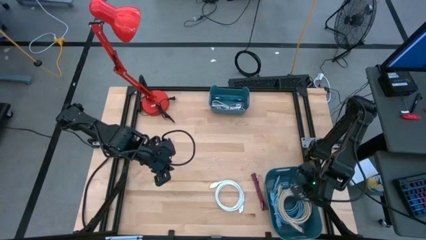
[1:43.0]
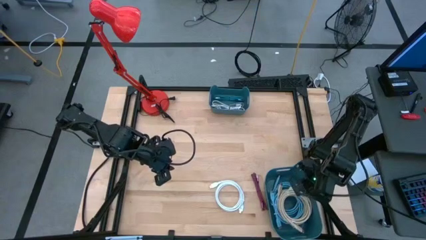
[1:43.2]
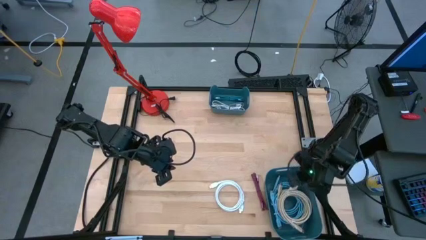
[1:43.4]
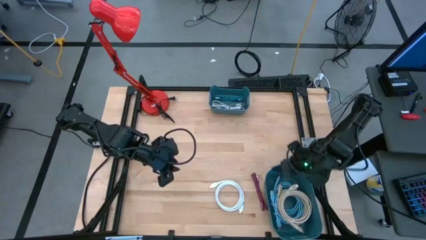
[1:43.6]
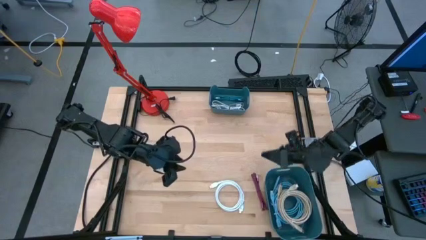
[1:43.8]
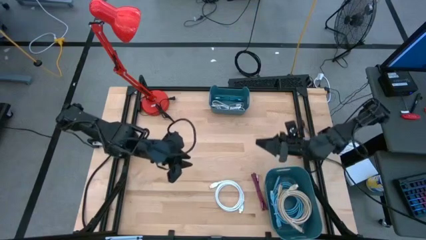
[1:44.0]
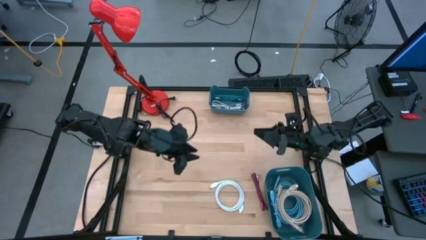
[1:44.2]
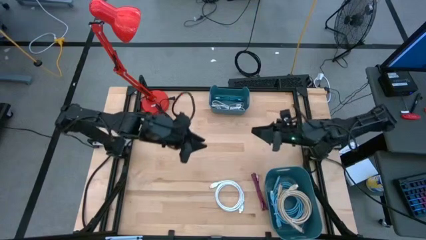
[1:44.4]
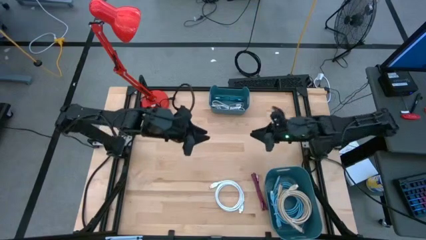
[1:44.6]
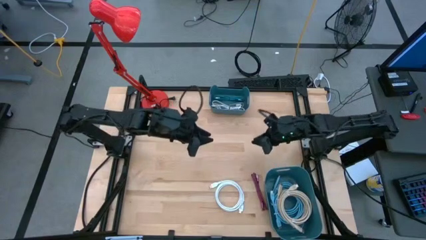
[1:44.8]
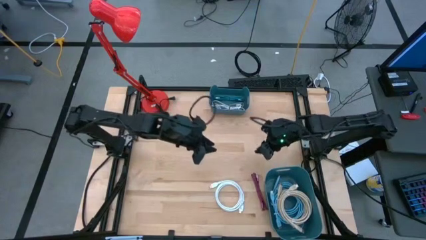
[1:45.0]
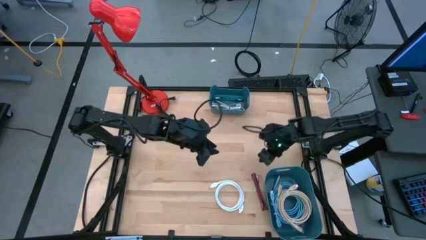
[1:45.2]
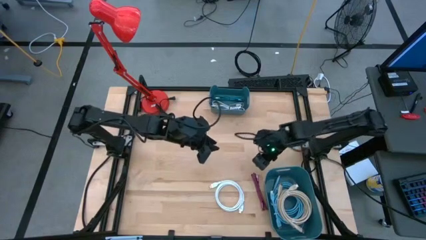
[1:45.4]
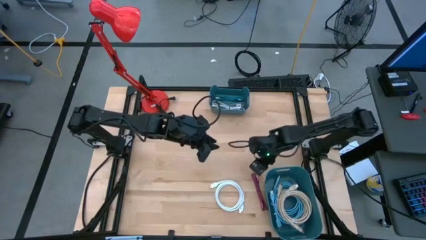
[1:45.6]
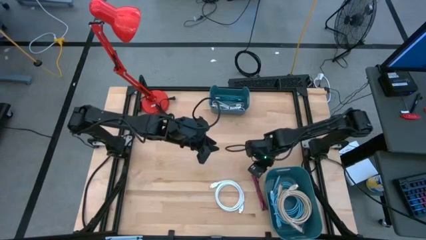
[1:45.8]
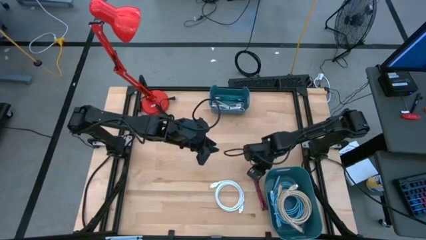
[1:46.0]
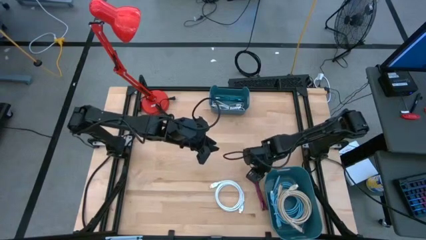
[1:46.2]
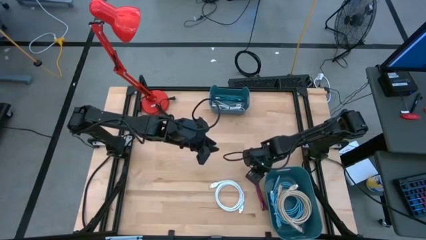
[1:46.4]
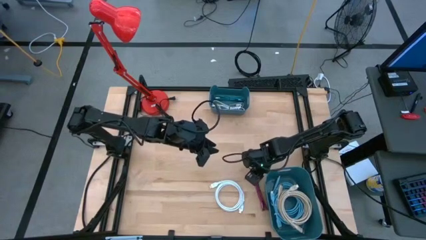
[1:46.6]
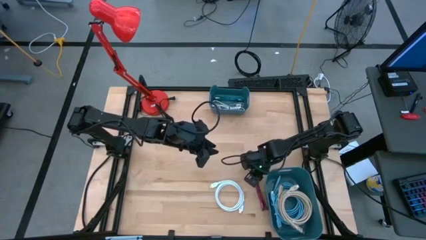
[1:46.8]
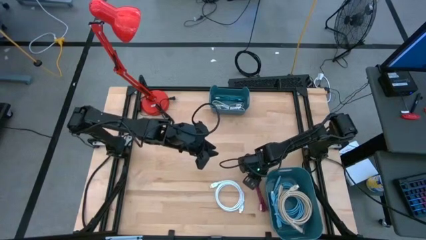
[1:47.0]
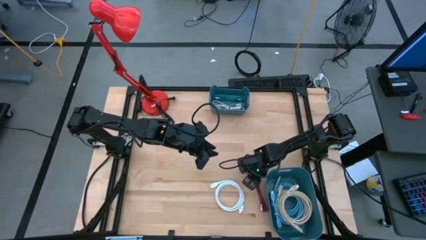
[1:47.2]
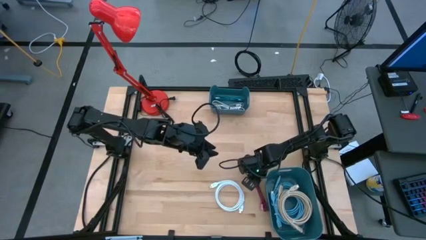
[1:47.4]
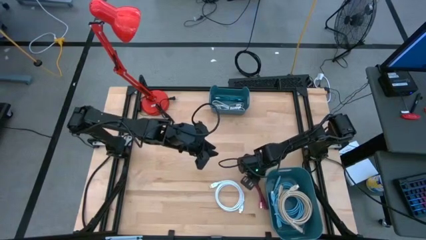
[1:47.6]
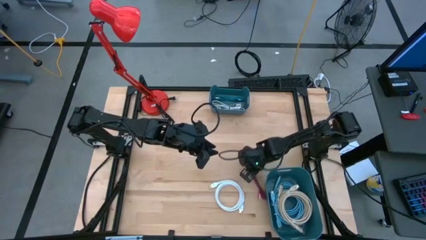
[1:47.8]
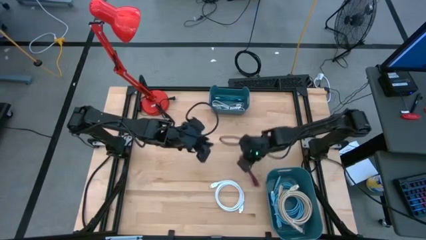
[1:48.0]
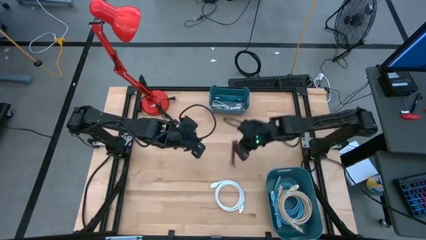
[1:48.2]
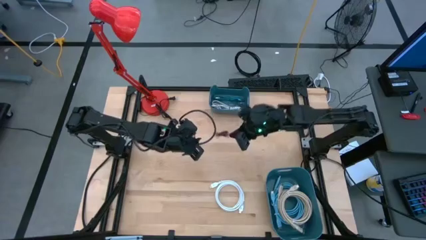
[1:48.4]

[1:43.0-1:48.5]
Task: Pick & Place USB Port
Put the pink charger cable into the top blue bin

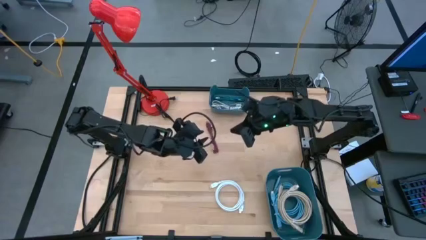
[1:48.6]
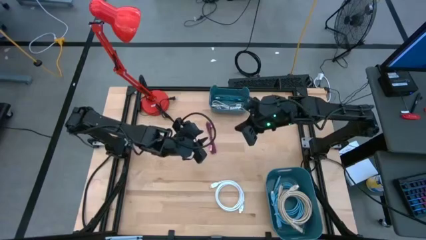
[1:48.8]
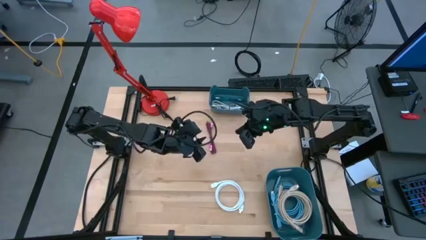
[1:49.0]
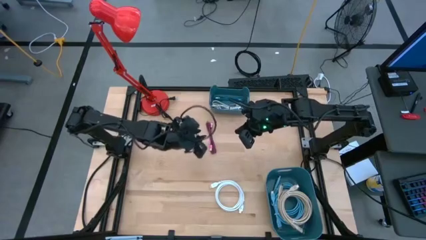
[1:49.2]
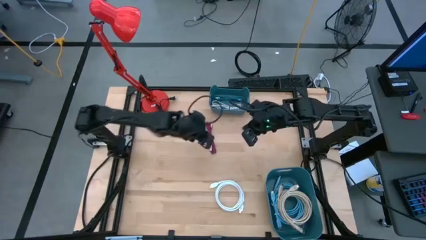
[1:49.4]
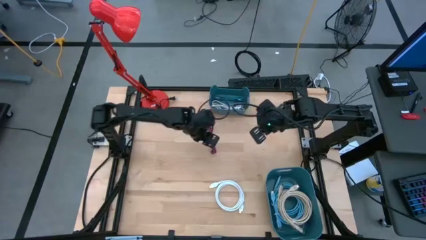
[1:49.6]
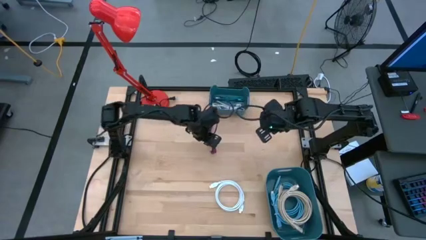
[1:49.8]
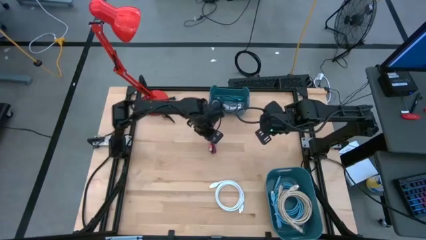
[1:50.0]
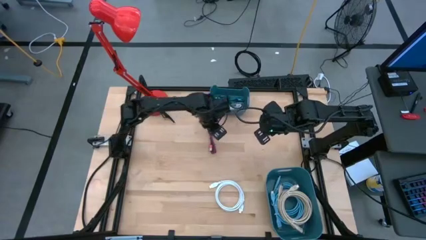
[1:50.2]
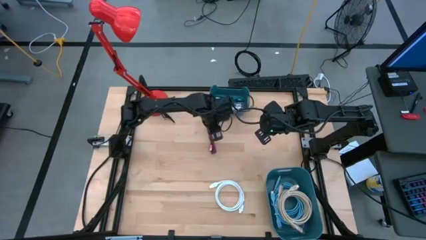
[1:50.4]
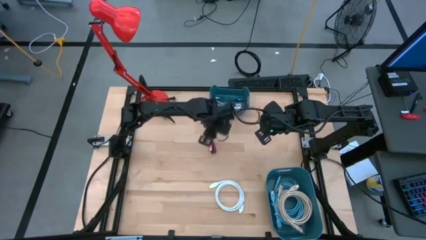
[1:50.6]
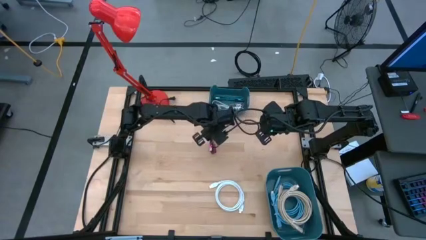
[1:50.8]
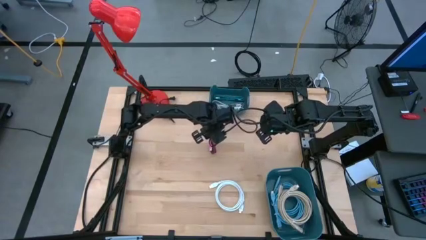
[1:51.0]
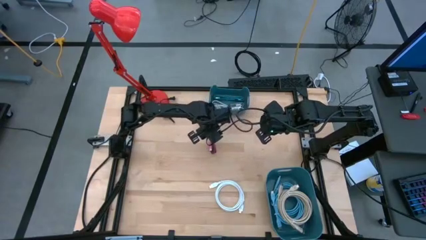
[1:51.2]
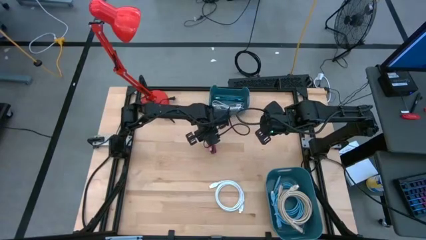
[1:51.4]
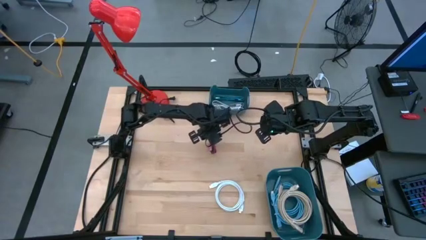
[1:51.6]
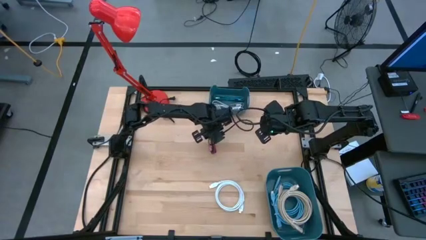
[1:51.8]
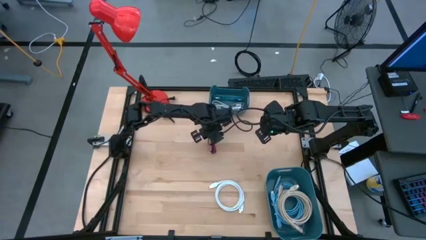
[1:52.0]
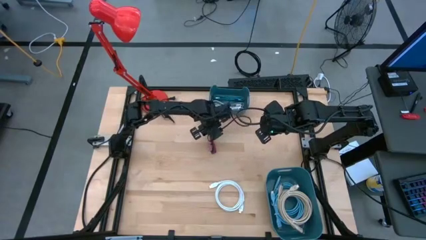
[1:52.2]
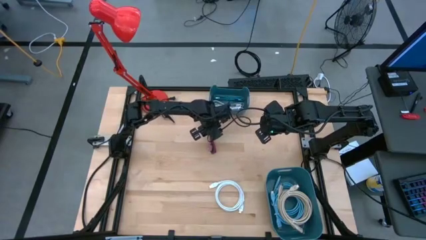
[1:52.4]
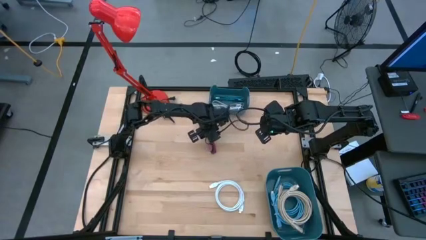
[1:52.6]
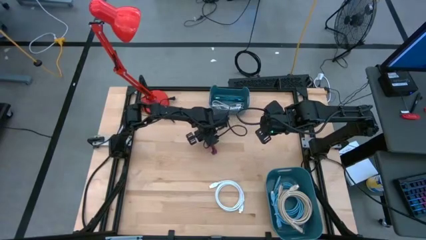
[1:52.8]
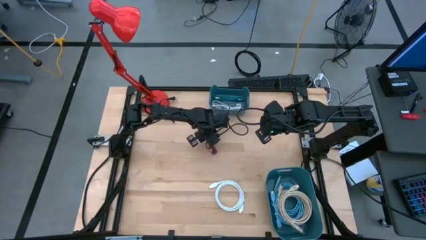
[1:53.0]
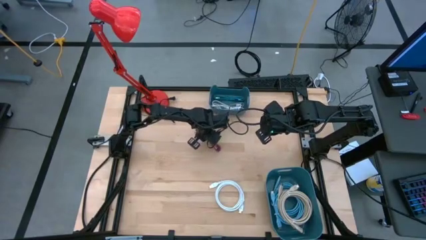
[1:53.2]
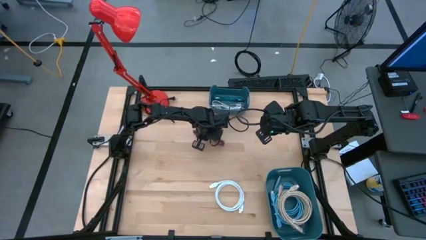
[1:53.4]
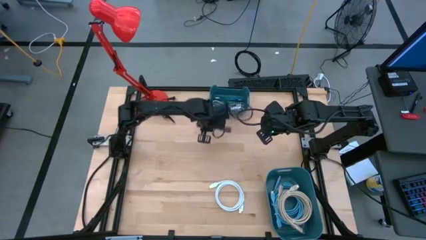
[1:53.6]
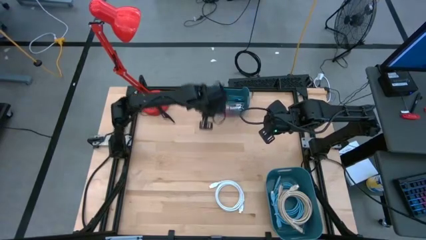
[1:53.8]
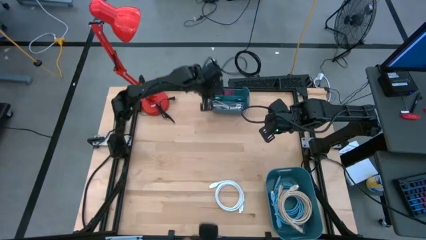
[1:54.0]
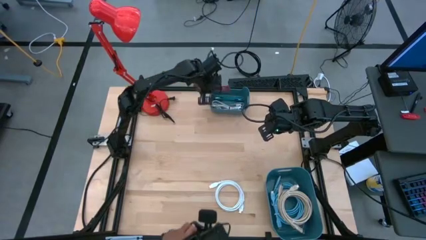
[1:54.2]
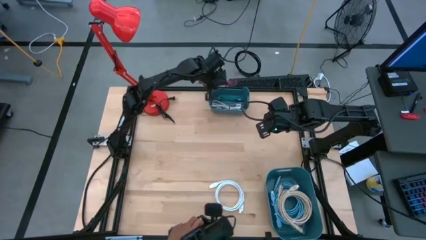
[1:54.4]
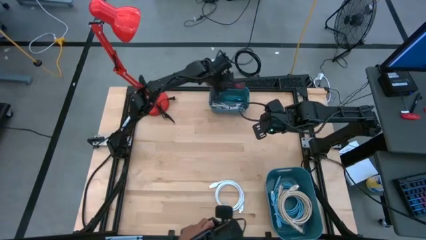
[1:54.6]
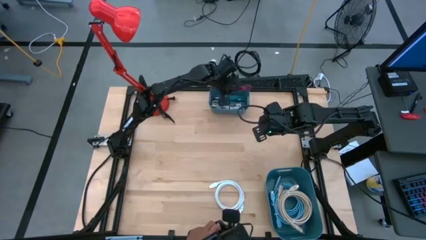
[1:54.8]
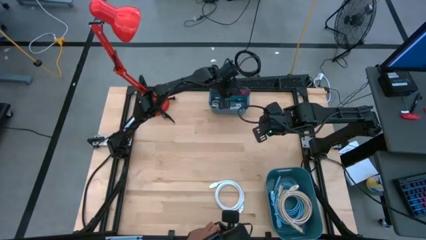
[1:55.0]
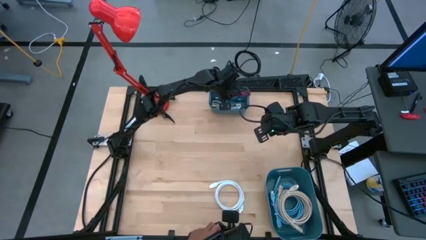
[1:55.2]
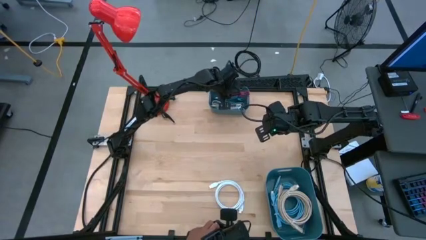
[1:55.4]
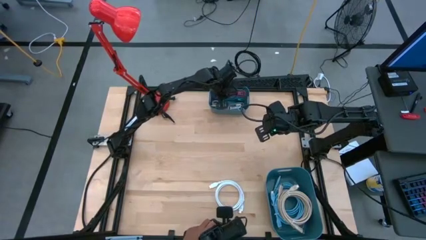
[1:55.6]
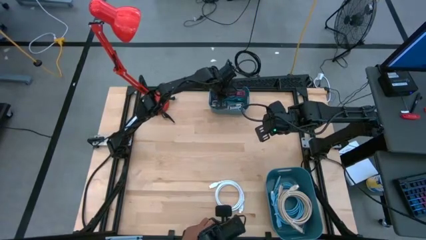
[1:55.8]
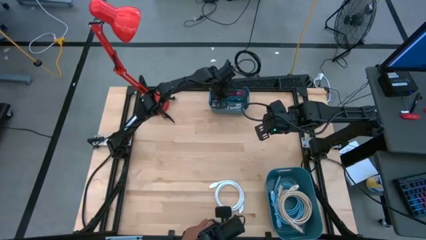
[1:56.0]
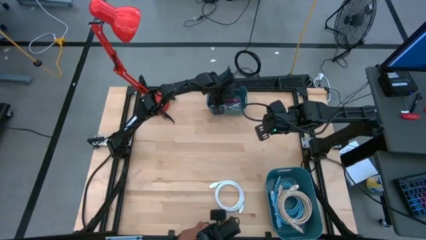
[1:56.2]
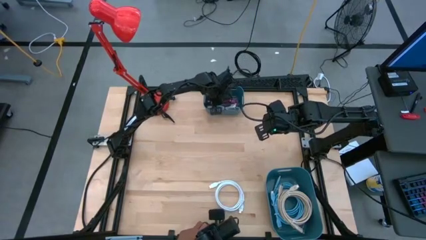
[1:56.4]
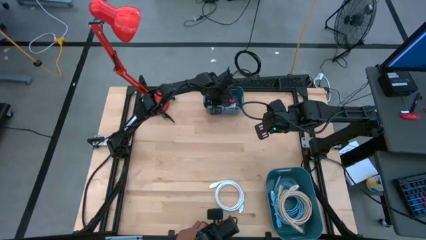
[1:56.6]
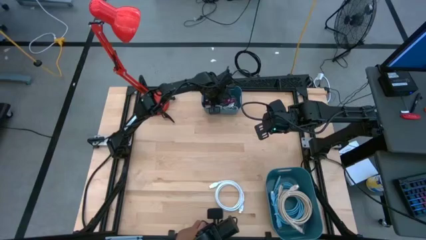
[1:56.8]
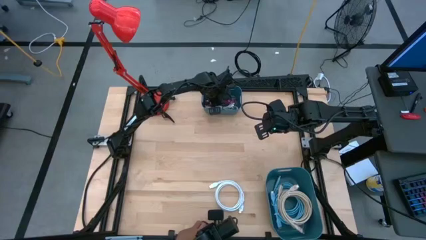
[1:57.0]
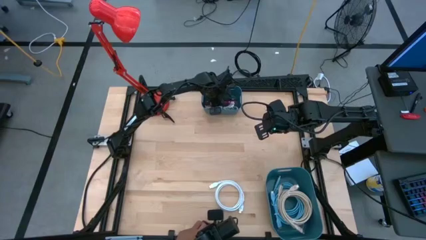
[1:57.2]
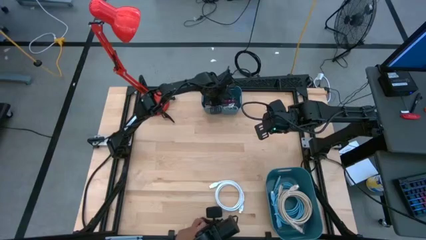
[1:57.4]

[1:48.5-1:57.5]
Put the pink charger cable into the top blue bin

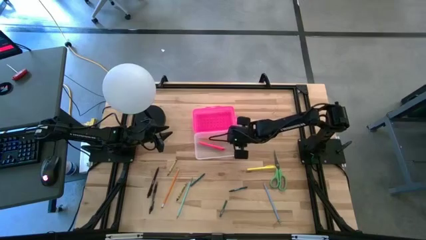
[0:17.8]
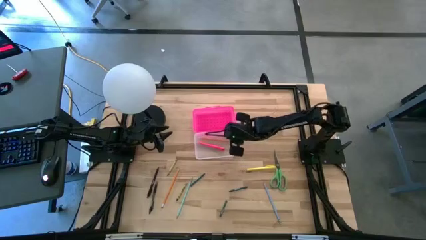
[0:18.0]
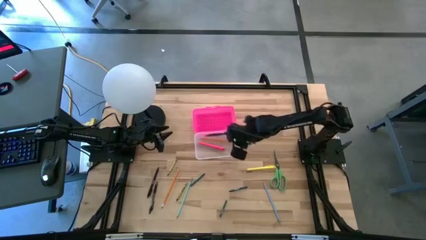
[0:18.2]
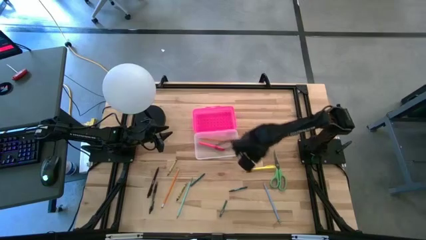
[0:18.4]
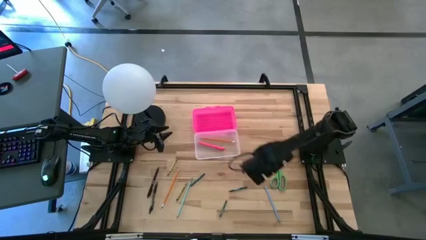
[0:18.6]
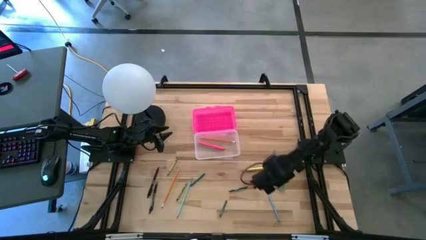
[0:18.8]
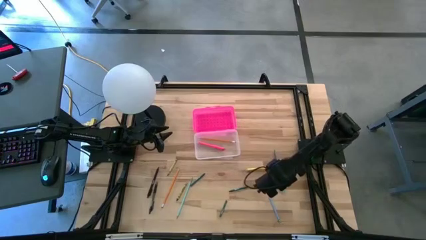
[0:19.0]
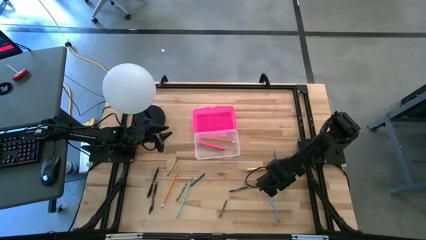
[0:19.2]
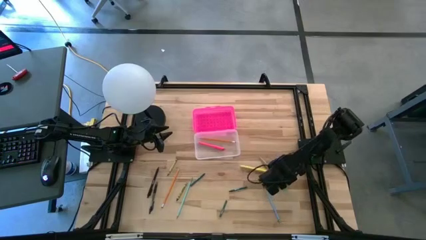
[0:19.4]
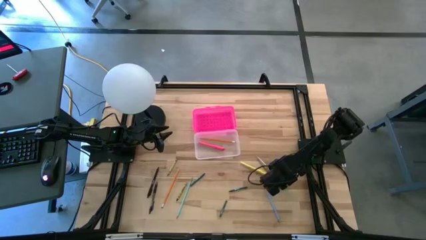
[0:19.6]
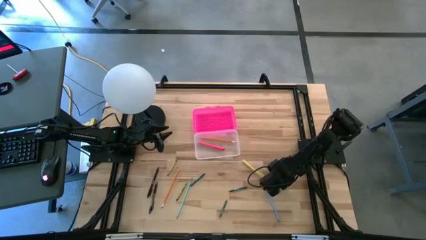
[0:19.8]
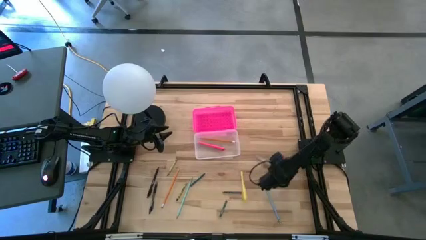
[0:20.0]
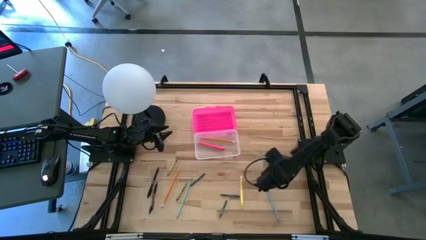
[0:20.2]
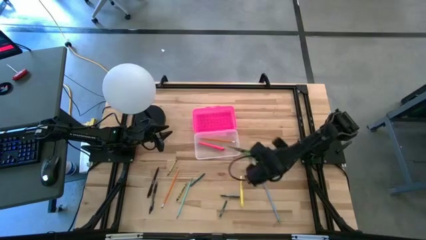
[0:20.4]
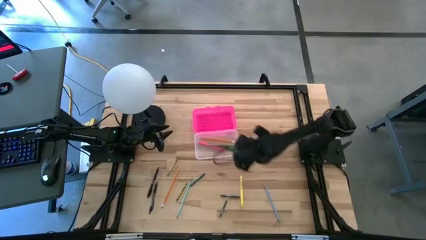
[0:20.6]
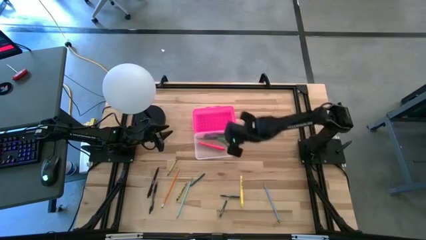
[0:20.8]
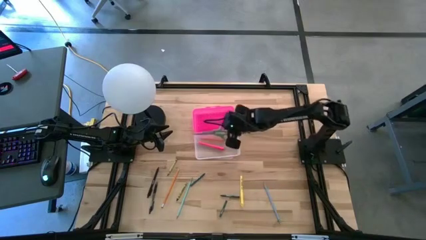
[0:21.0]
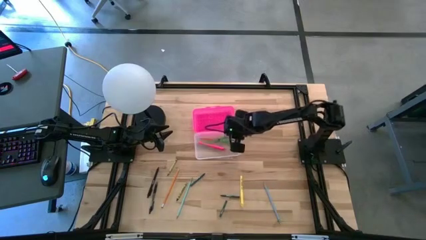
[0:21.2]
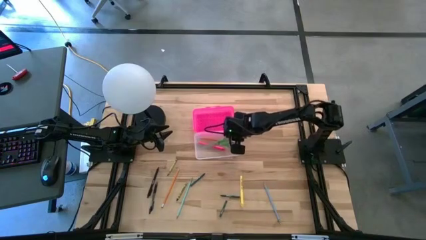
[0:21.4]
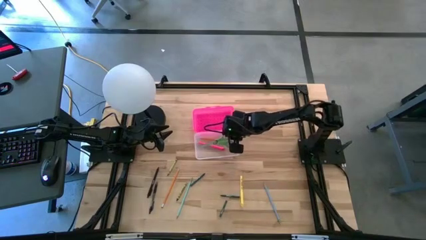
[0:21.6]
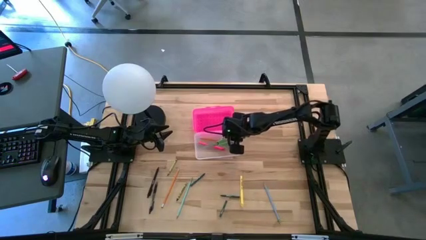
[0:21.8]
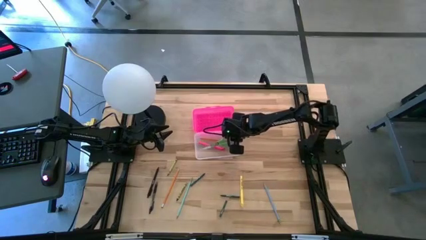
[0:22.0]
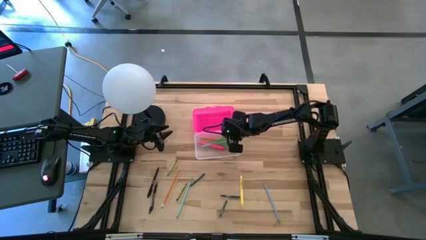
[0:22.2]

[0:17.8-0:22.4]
Task: Pick & place school supplies into a supply box
Put the green scissors into the pink supply box
